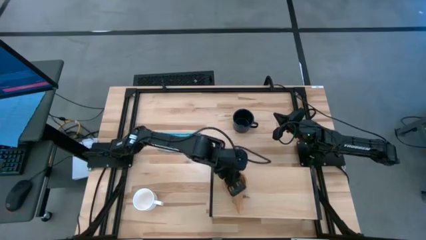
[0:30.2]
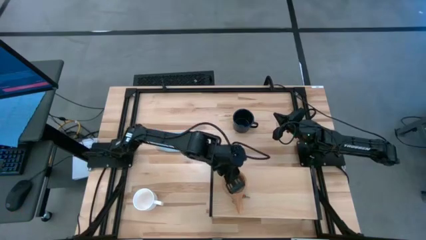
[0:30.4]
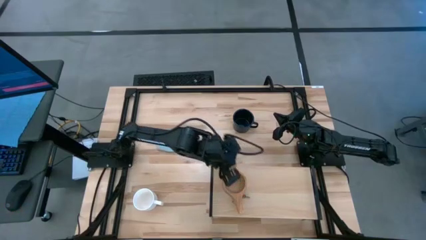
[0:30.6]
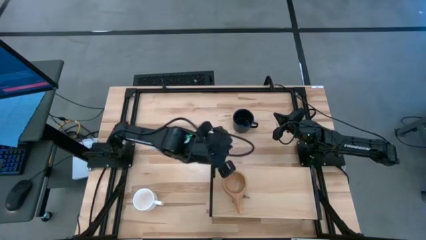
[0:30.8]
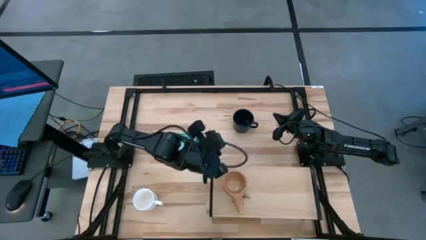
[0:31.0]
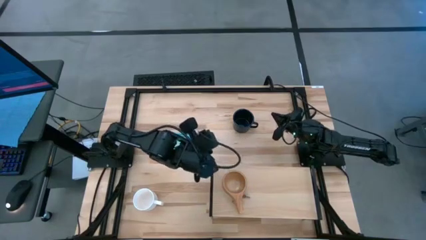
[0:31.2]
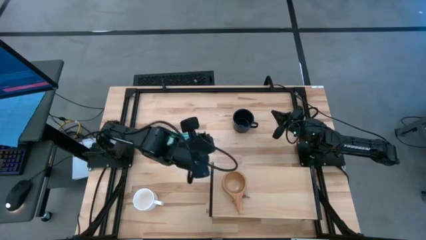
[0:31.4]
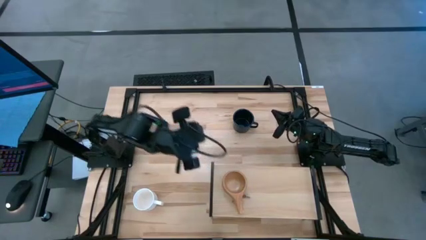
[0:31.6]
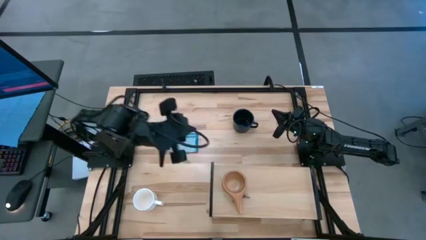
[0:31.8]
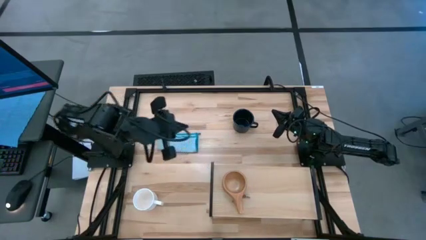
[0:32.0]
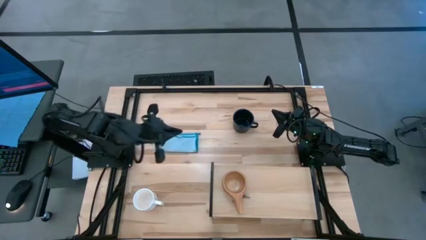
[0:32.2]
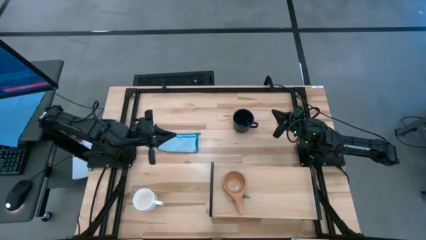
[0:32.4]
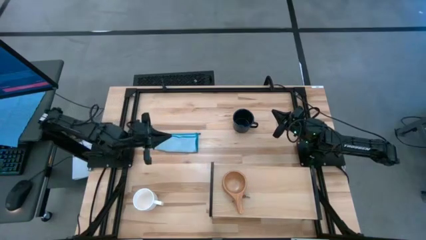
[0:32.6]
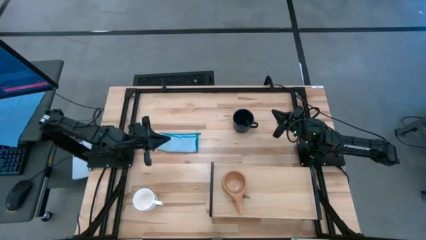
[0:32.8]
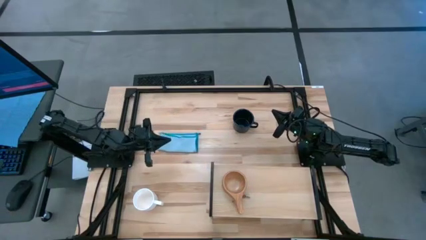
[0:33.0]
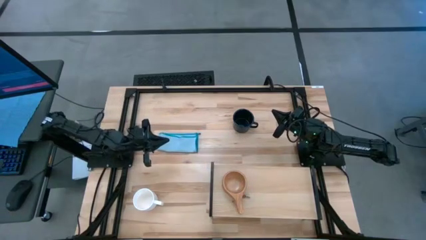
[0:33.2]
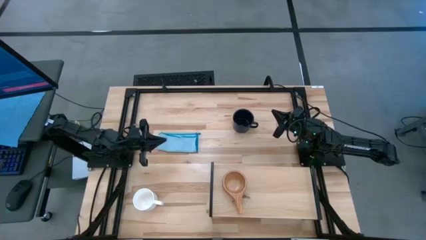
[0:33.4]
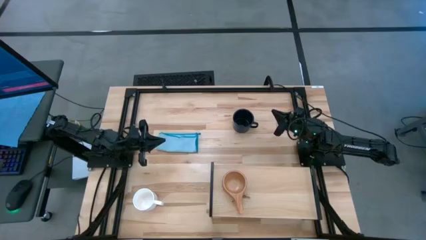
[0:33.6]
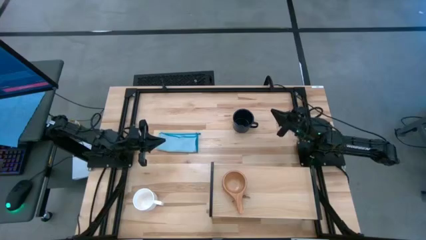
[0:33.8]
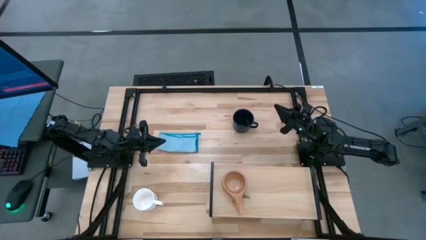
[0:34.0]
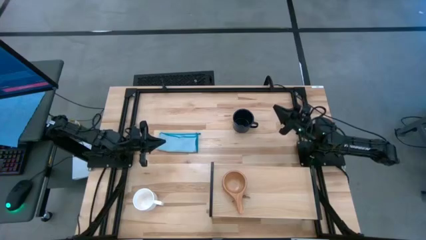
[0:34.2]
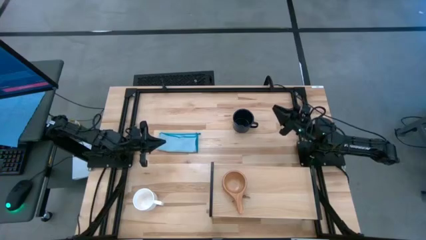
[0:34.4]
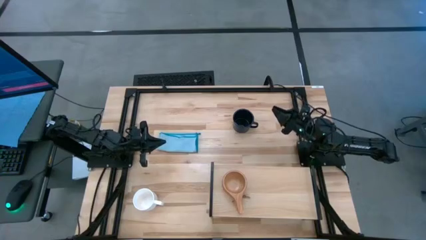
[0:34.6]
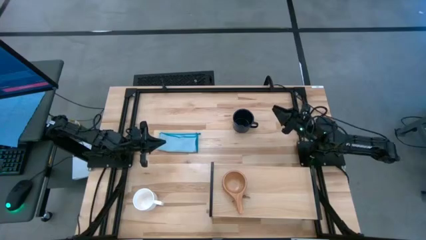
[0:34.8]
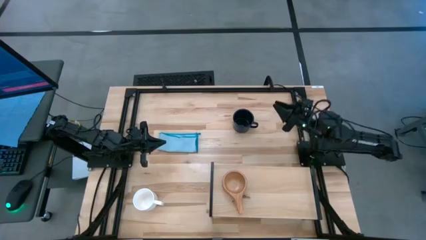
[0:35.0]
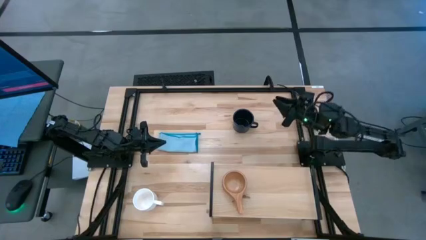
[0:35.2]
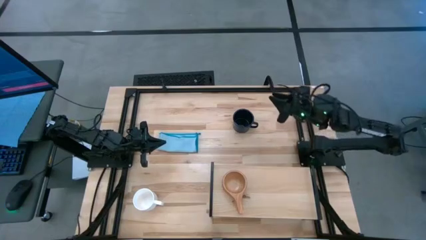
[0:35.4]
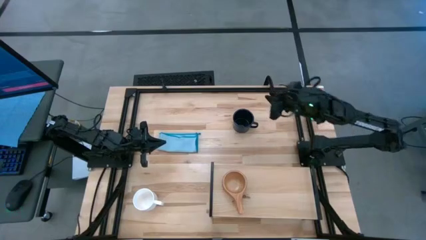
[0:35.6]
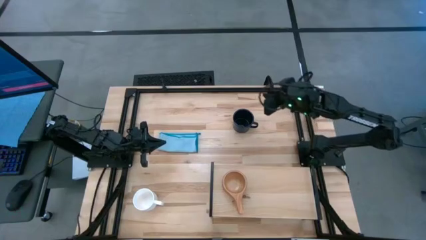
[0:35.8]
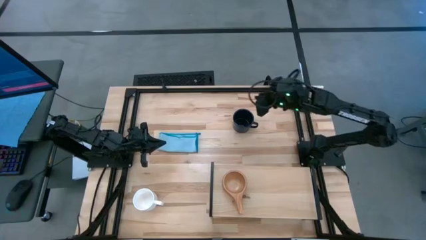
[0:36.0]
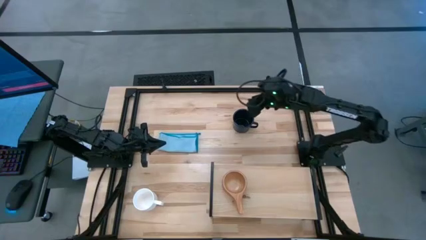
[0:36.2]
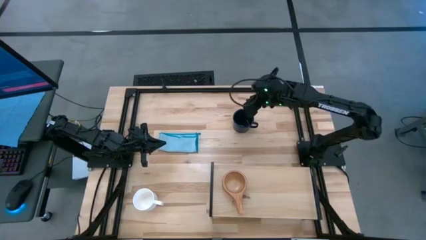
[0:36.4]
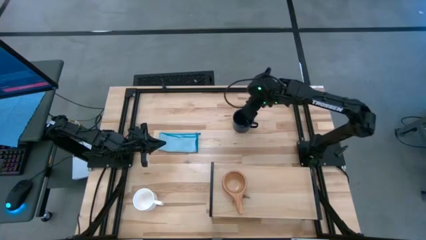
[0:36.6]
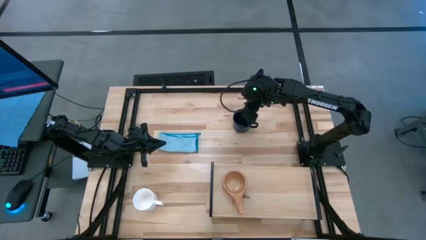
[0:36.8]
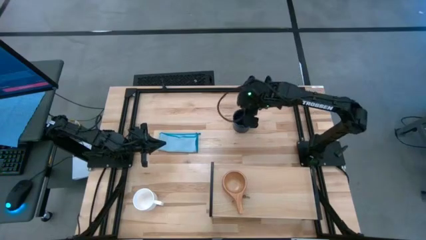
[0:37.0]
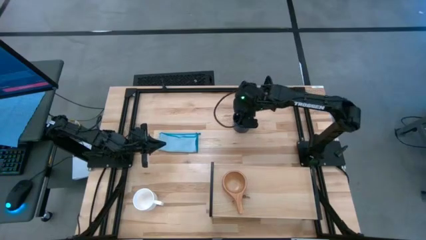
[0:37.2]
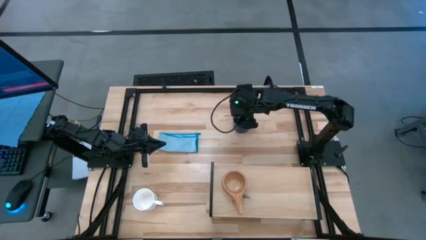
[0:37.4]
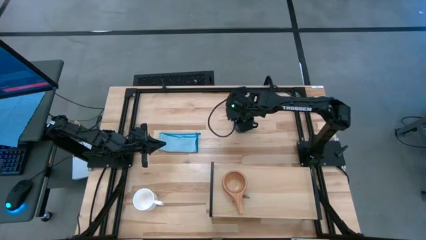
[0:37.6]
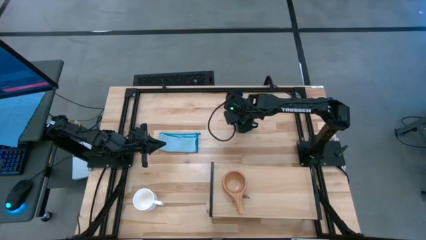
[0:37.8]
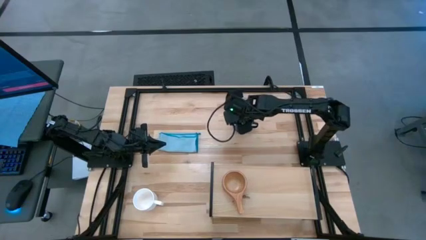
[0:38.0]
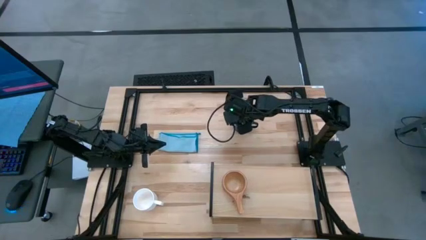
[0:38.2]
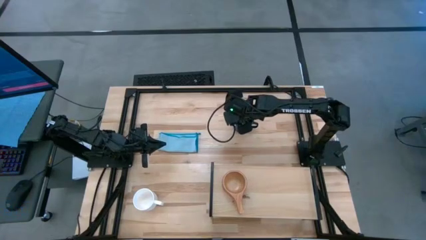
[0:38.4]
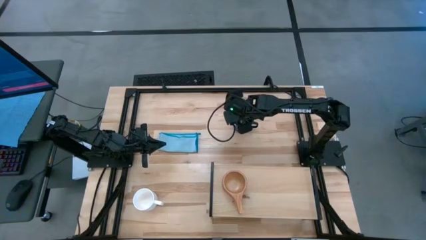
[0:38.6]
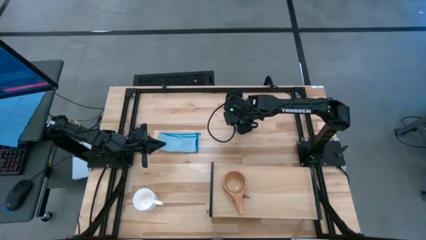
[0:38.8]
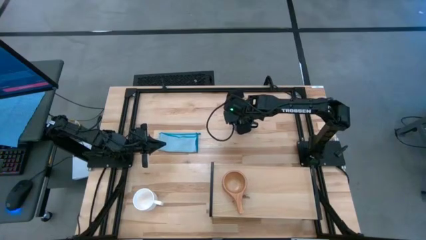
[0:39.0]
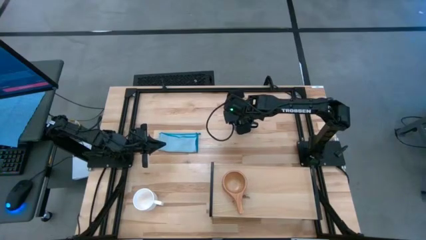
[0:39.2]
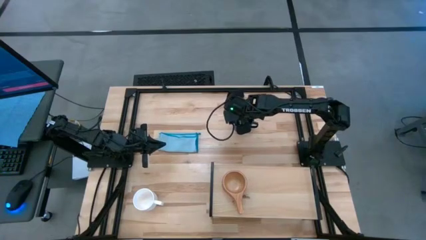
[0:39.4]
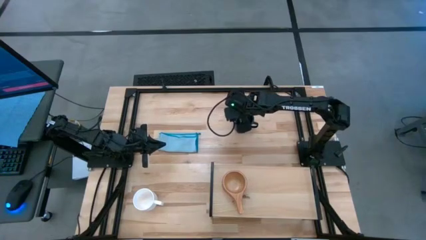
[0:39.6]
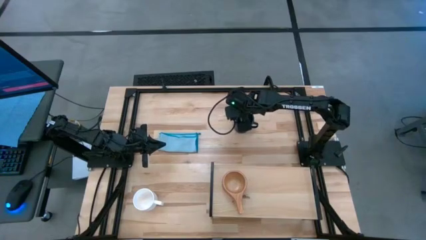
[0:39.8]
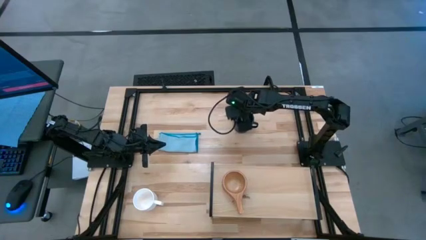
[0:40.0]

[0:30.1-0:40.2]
Task: Stack small to large cups/mugs on shelf
Put the black mug on the shelf

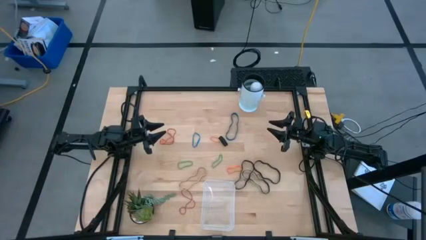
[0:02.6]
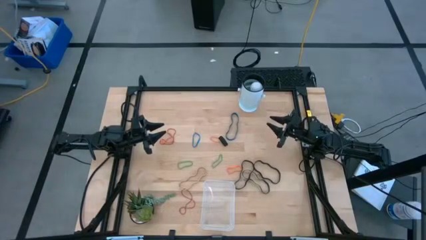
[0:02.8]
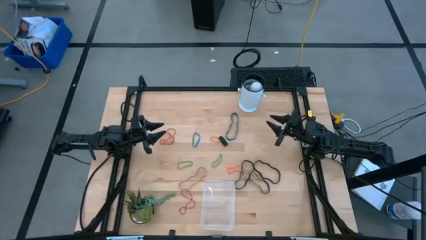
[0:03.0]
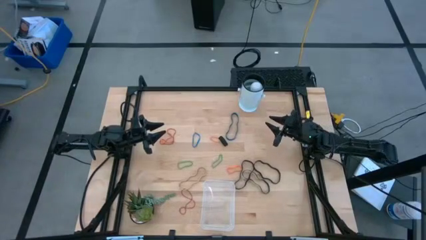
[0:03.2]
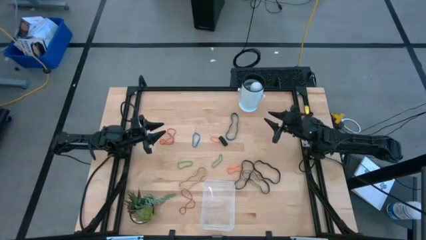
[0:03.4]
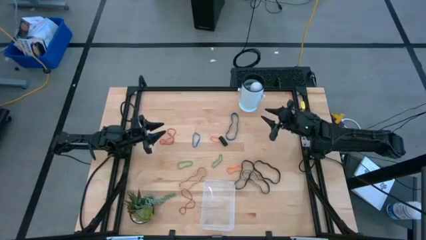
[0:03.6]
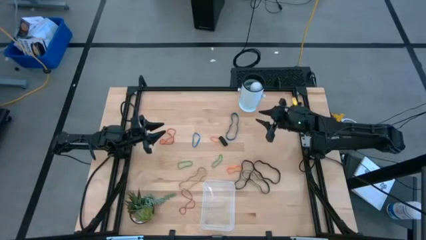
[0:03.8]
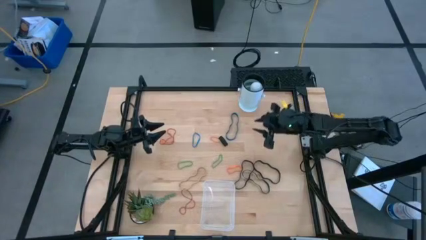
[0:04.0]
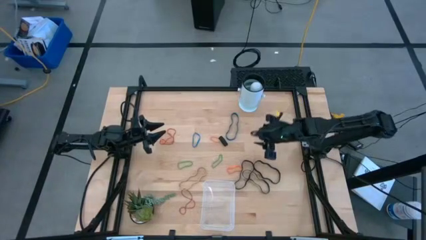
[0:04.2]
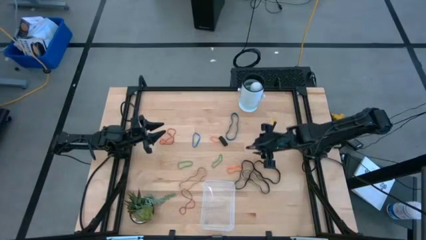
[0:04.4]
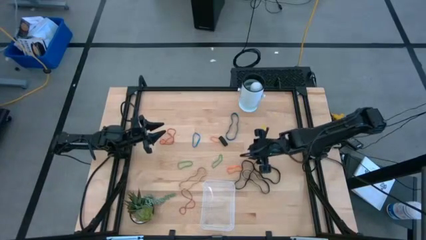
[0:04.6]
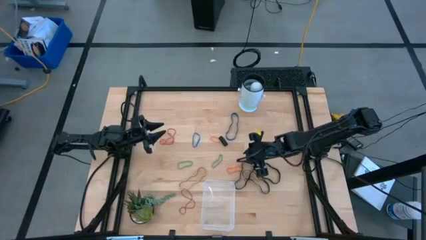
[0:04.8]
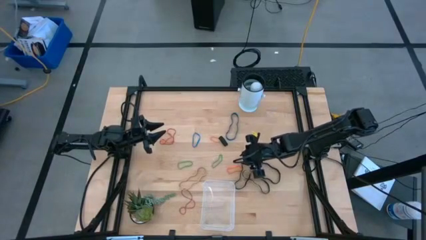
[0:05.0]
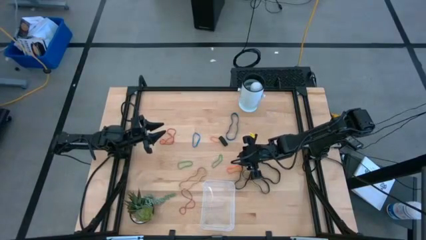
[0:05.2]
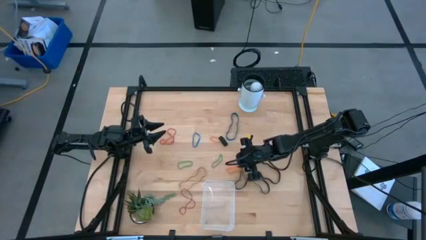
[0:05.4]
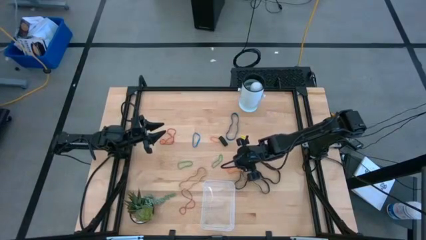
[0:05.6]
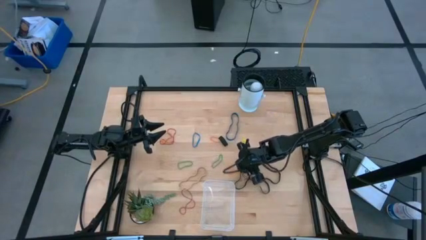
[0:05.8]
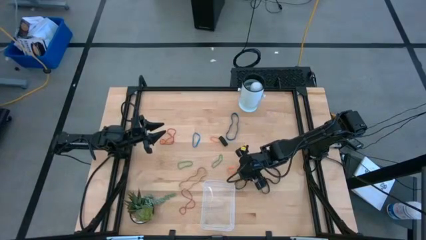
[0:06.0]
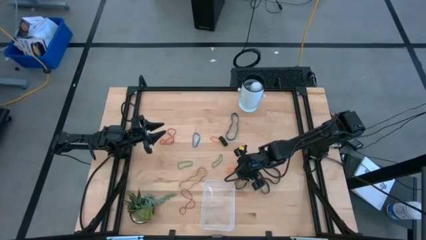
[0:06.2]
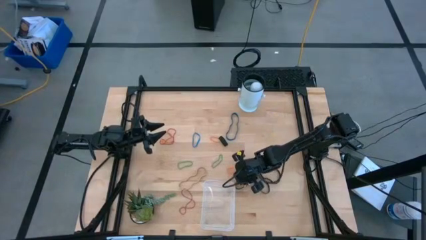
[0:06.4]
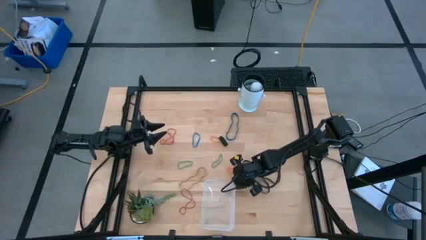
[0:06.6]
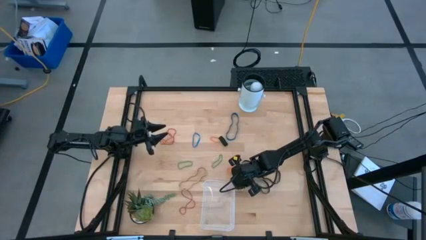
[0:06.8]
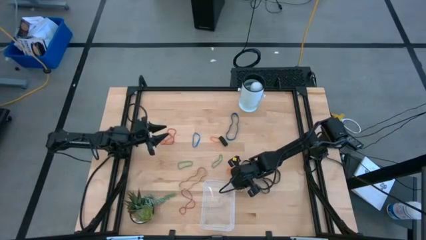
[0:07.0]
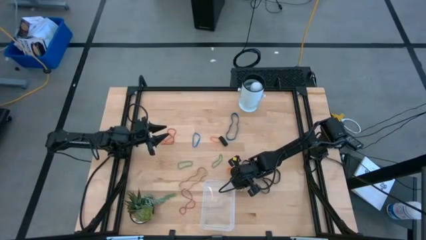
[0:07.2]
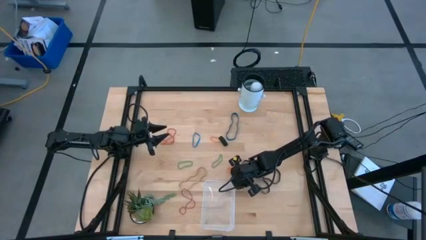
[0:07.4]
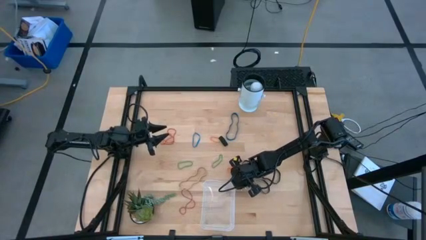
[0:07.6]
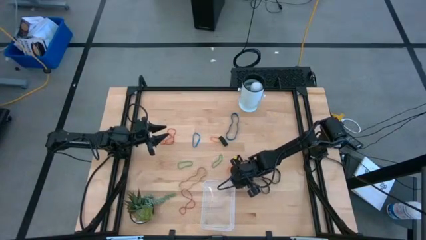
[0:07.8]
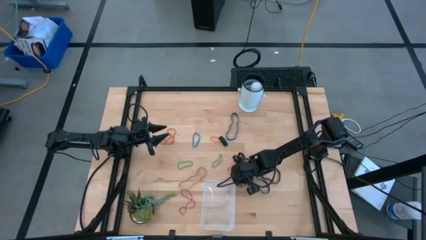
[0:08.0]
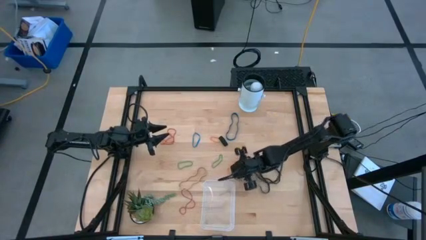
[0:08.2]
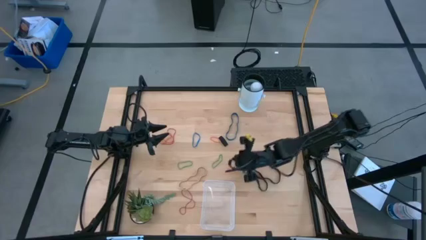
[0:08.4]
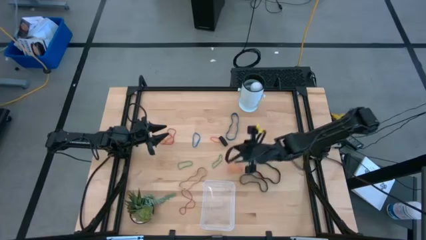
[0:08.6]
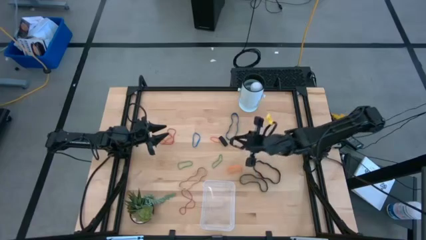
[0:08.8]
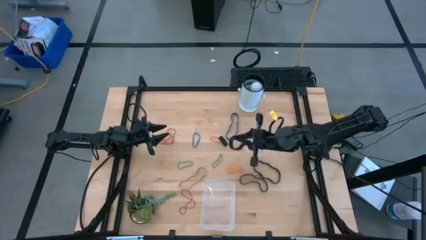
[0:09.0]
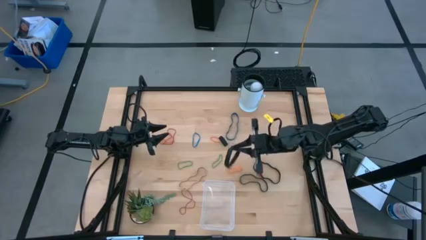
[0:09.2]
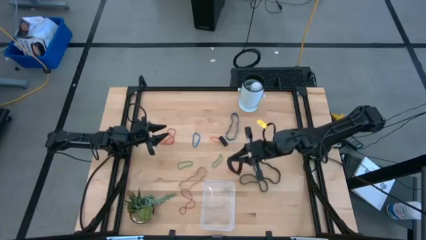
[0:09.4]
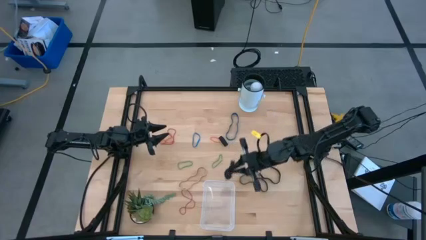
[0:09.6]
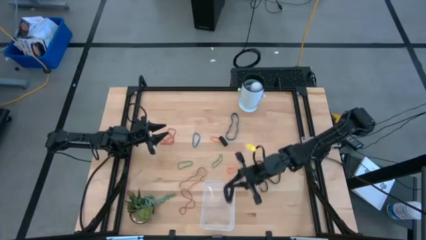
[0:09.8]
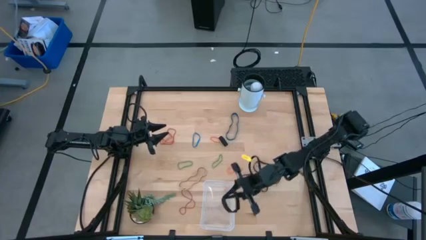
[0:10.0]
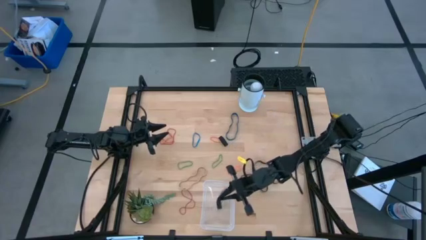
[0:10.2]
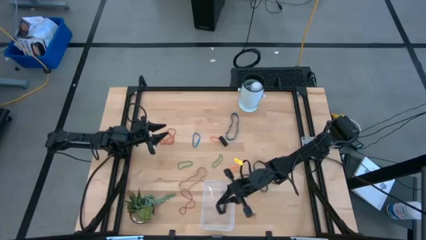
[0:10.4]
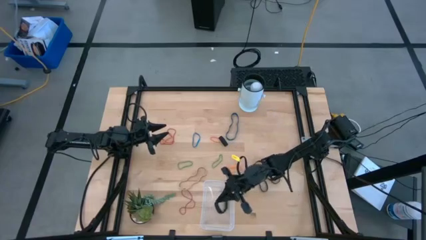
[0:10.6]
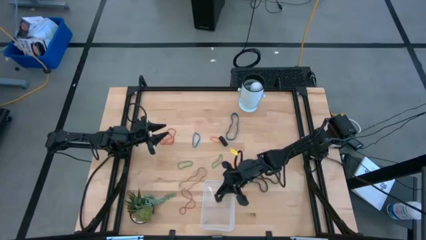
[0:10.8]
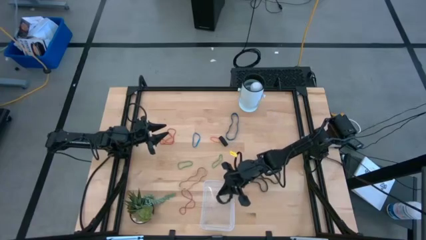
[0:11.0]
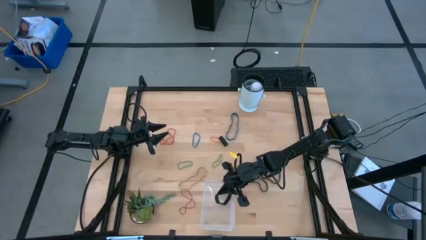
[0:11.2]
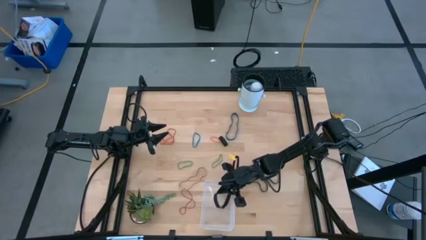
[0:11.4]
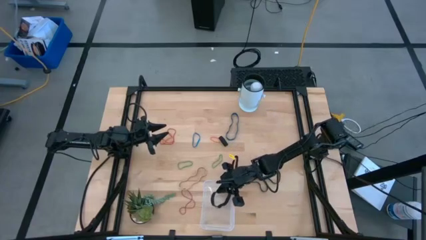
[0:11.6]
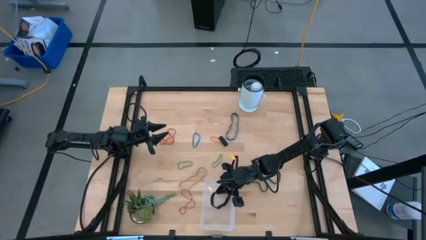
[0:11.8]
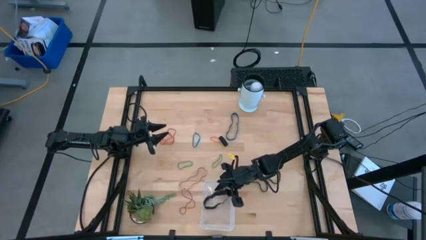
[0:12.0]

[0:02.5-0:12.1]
Task: Pick and place rubber bands into bin
Put the black rubber band into the transparent bin
